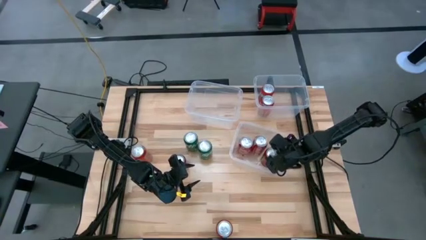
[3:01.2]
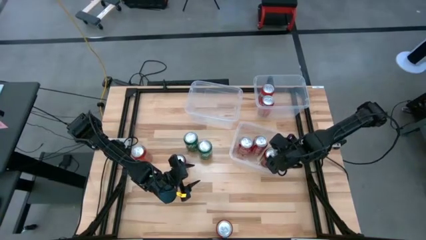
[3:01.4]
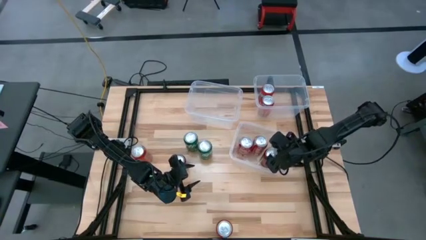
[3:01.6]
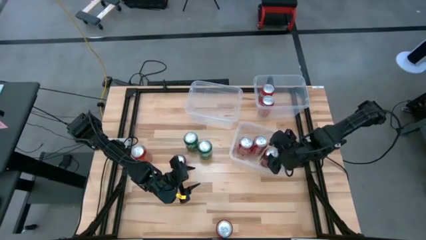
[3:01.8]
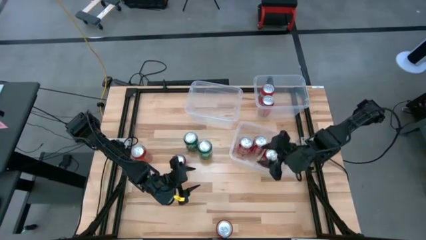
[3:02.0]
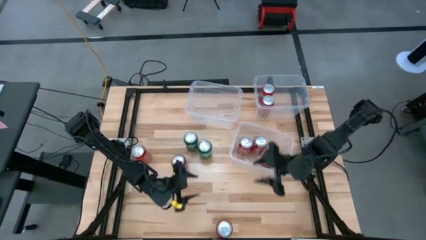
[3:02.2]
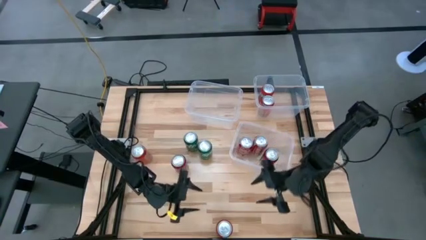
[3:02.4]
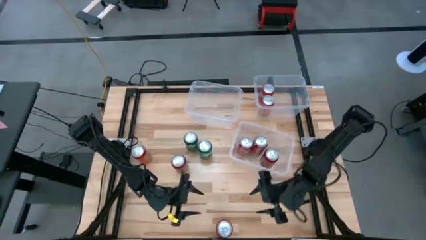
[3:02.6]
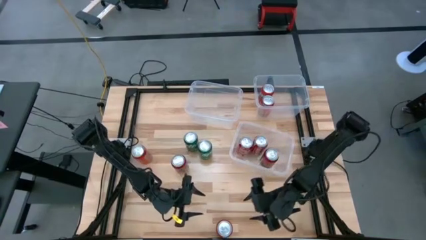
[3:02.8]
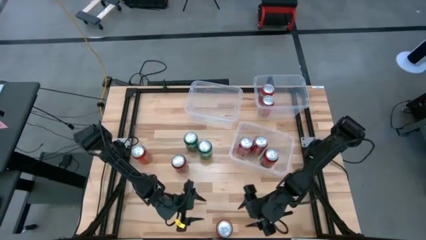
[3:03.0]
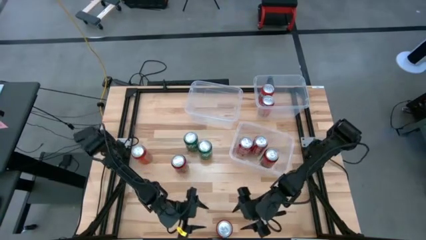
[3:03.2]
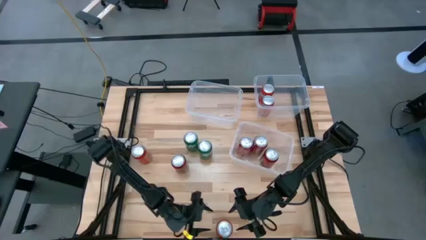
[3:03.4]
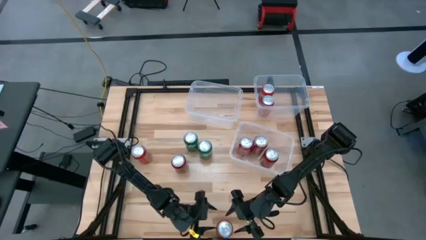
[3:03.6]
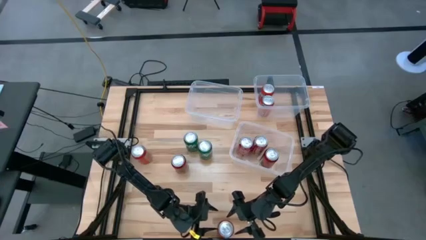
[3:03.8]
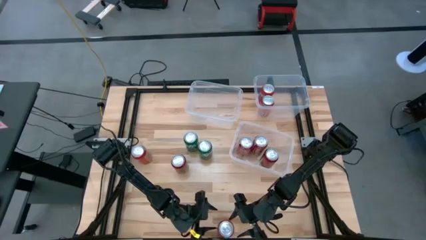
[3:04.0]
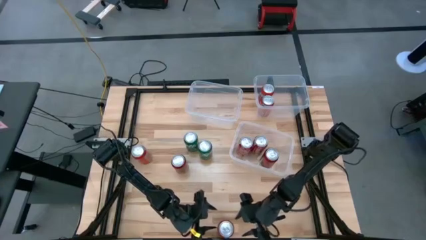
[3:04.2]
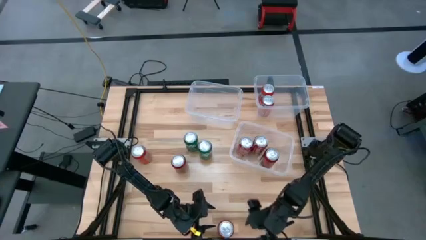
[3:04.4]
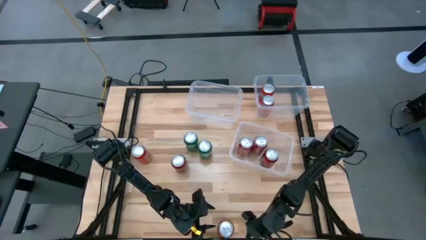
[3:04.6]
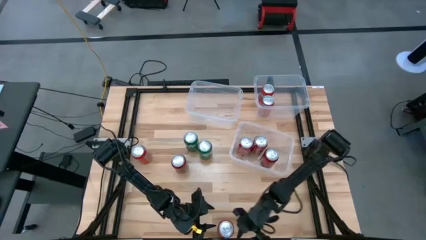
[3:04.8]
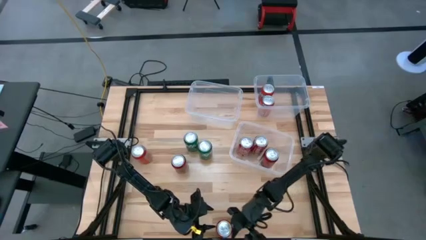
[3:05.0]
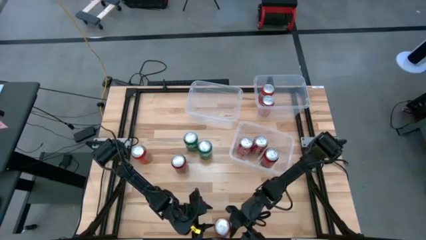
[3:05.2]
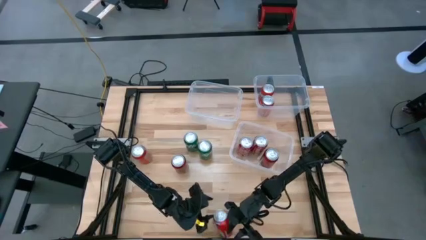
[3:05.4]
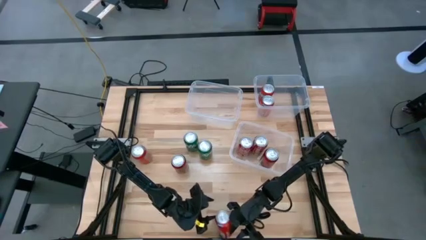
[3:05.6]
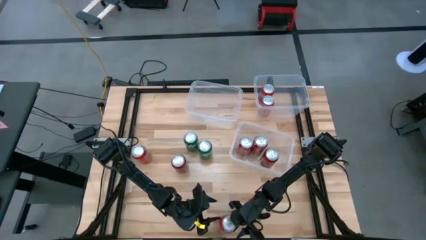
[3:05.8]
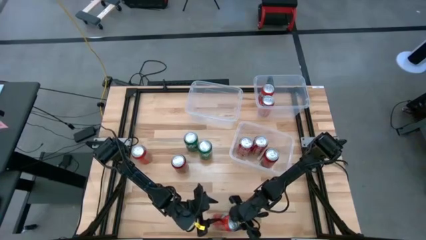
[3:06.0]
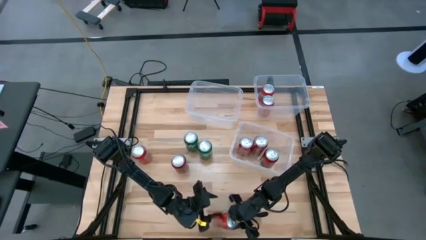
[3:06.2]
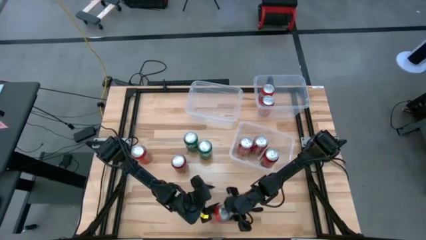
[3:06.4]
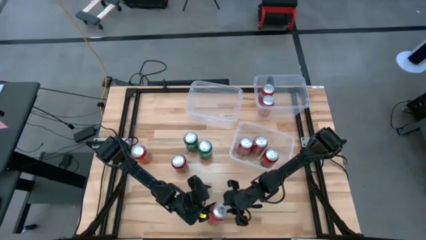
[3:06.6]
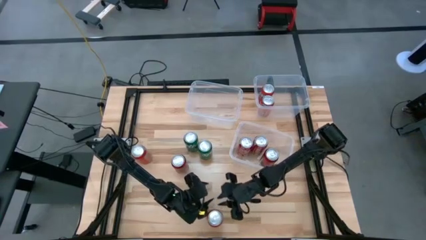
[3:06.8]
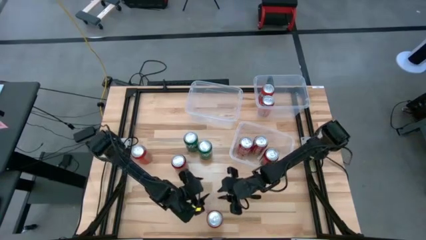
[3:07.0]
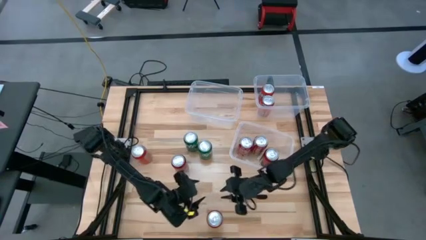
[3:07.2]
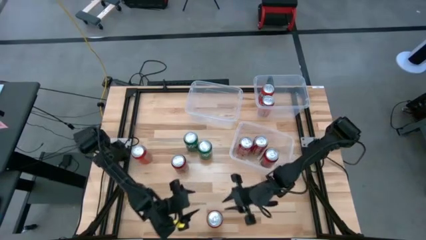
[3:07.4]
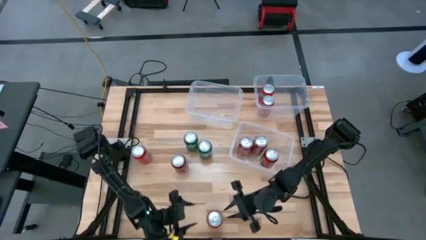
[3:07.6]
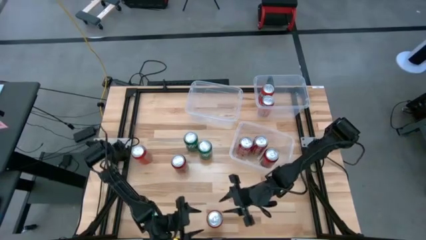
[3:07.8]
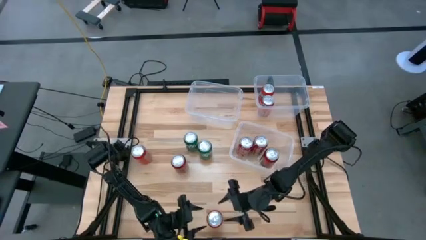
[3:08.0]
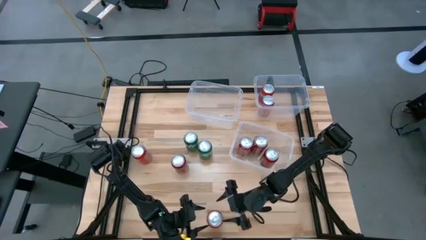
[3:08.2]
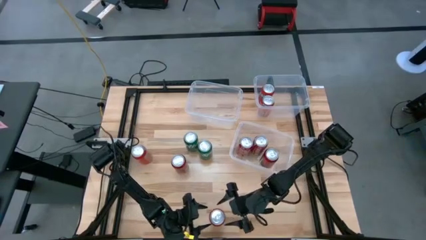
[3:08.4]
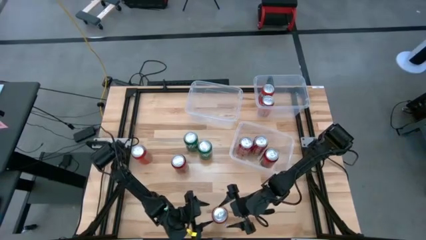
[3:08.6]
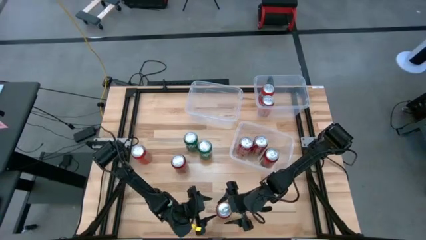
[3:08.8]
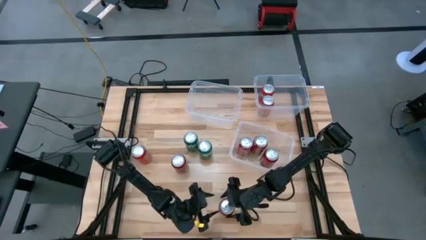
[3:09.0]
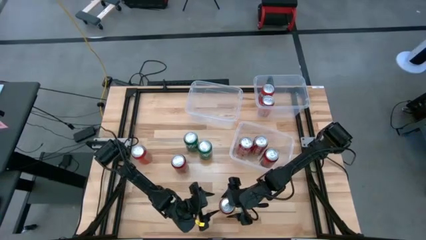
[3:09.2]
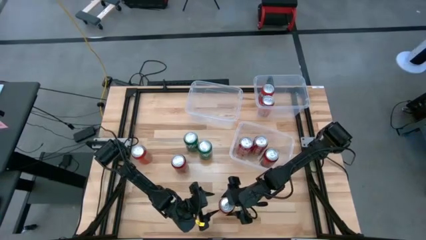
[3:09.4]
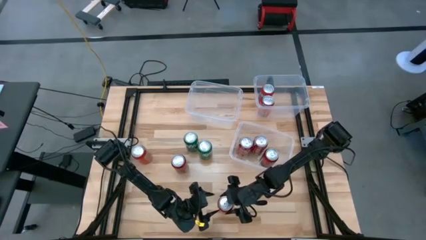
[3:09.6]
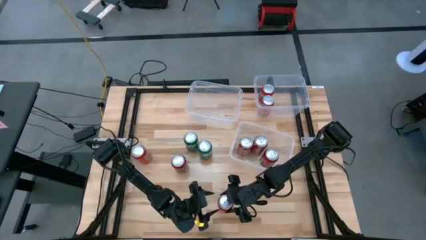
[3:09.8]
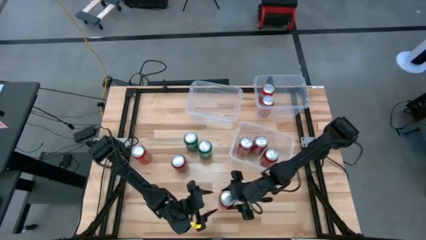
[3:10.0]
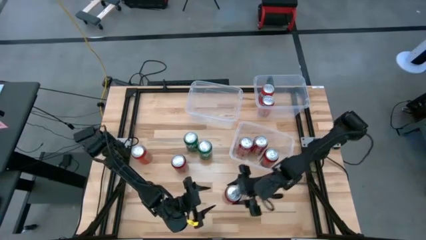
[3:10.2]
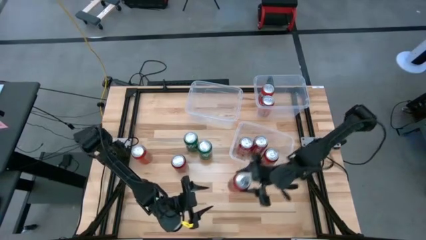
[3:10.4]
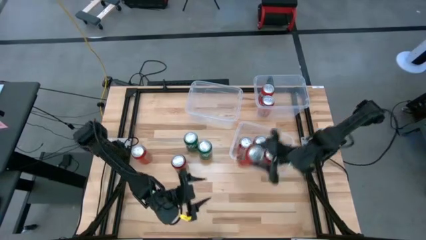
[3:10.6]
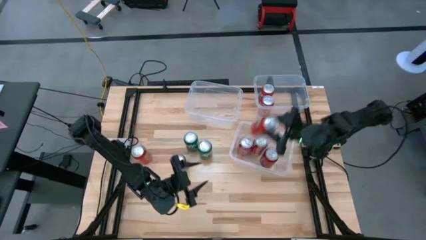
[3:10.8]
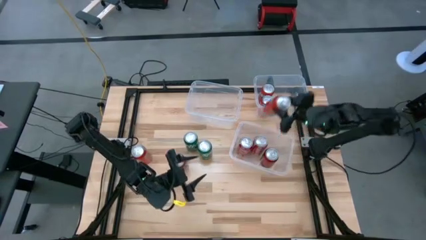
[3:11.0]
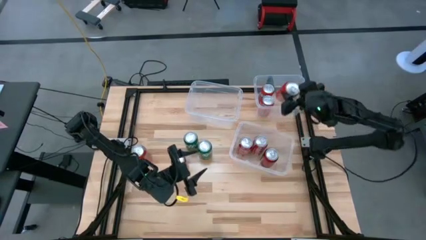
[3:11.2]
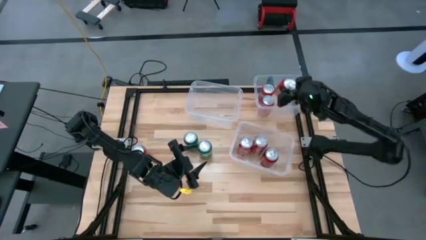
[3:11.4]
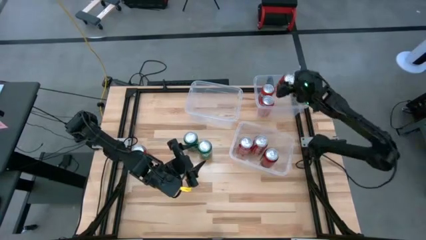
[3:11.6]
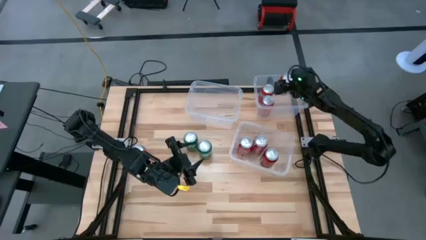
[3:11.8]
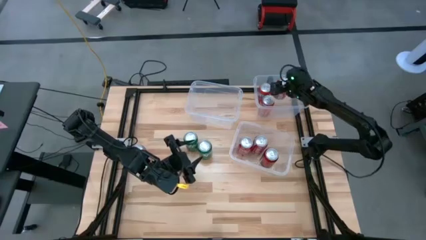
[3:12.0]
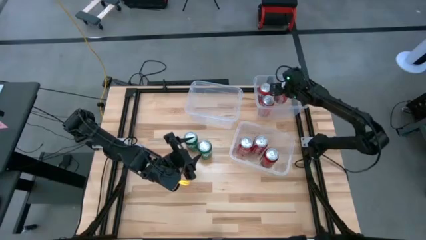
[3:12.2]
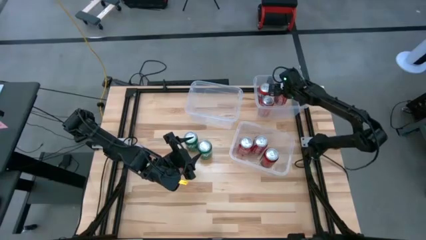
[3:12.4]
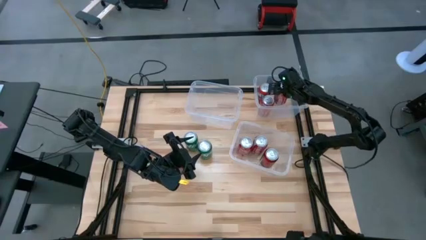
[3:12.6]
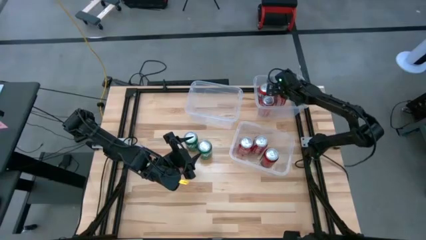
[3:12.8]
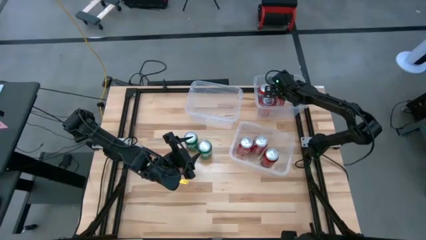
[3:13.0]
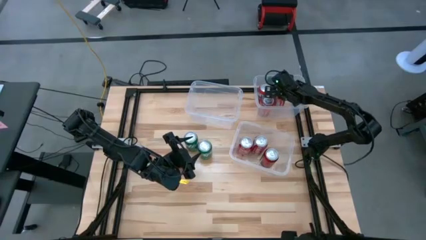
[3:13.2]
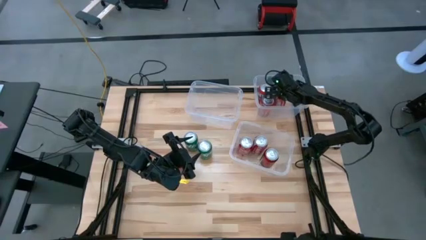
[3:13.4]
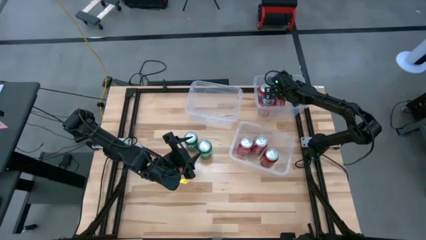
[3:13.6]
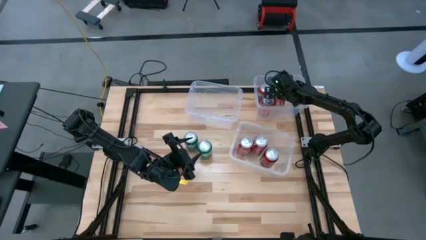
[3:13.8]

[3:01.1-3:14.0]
Task: Sort soda cans
Put the bottom red soda can into the top right transparent bin

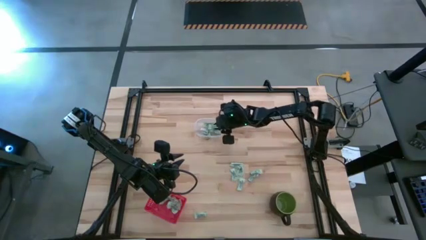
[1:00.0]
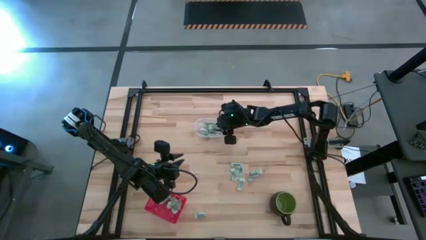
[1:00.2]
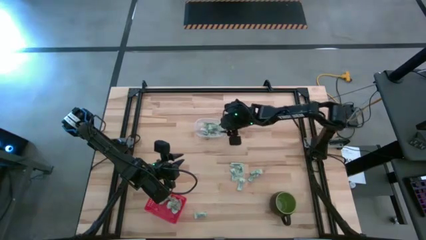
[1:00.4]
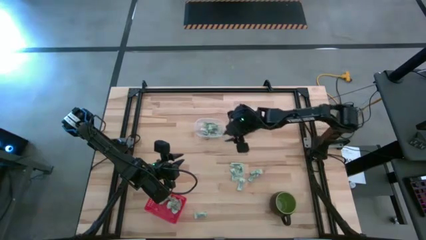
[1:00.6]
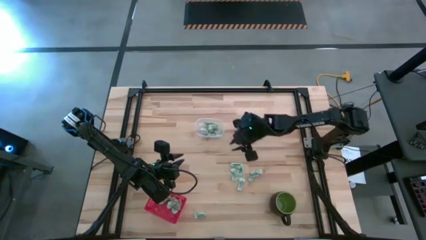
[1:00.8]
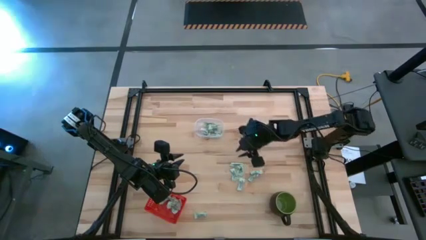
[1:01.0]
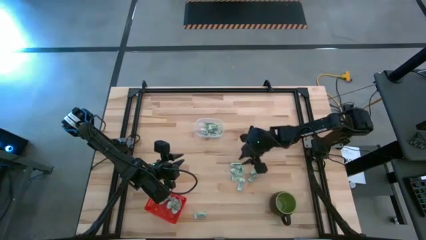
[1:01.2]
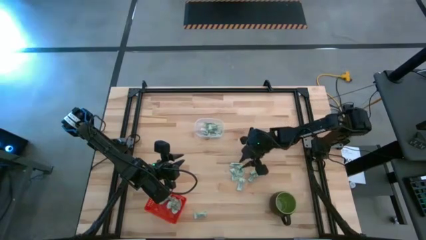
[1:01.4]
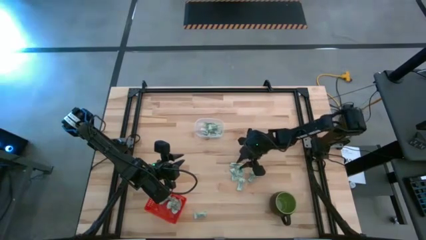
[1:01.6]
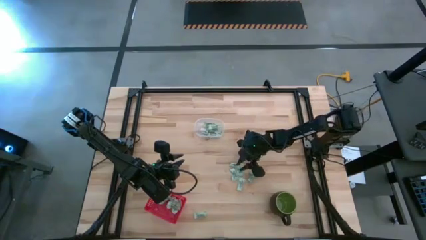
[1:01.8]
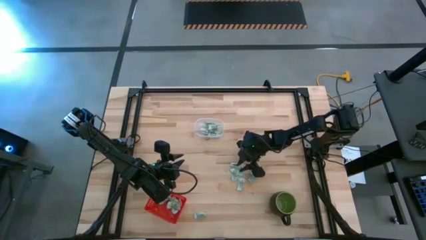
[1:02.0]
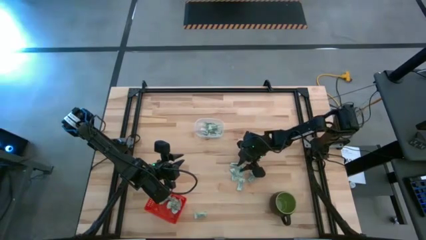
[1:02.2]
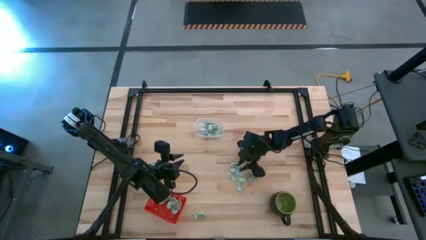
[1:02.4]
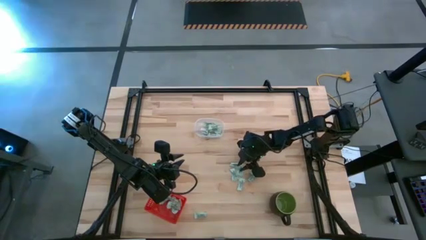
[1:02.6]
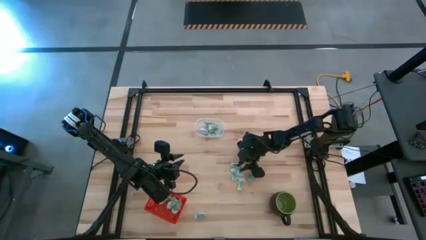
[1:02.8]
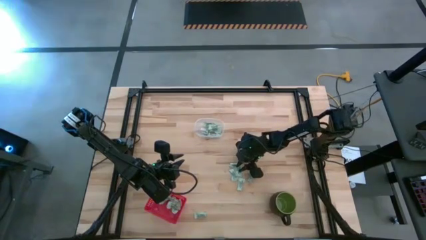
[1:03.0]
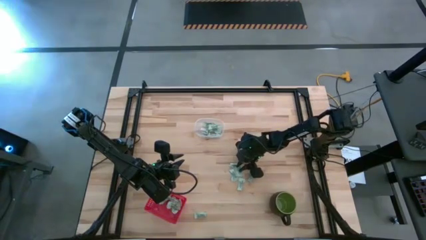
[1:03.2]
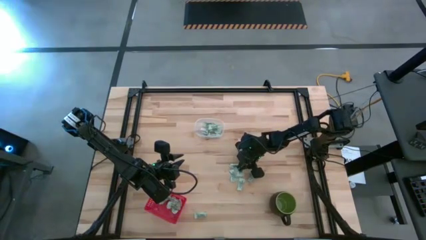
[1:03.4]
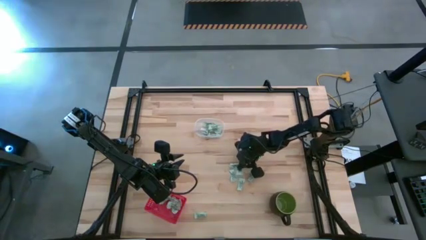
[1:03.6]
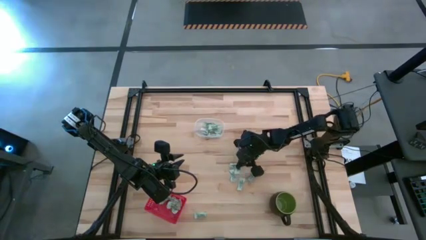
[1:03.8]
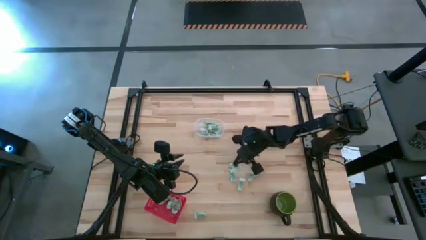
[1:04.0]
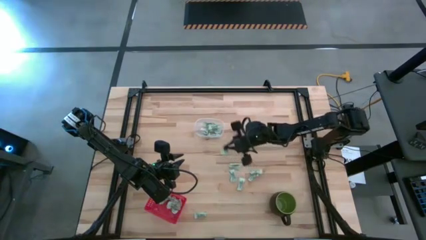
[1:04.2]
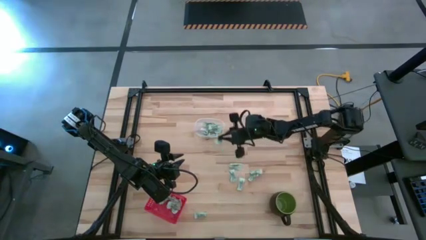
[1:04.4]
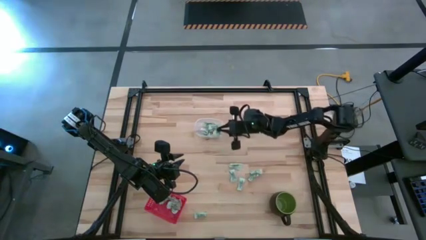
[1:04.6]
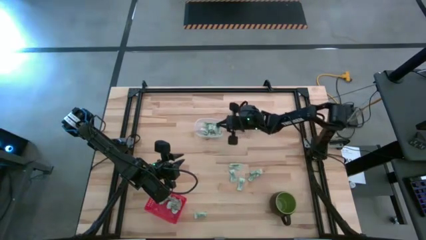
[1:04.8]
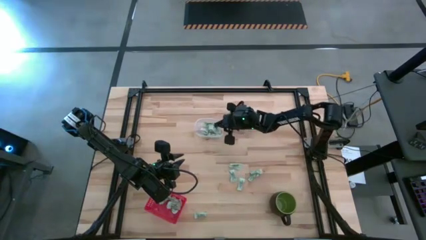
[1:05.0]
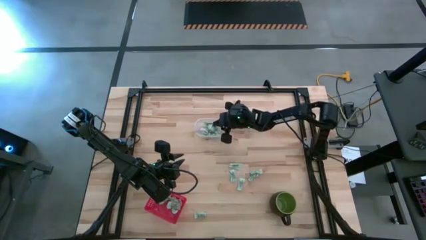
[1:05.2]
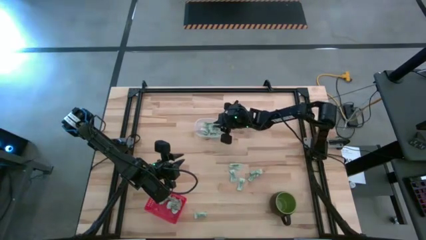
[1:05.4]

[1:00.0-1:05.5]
Task: Pick and place items into bin
Put the stevia packet into the transparent bin
